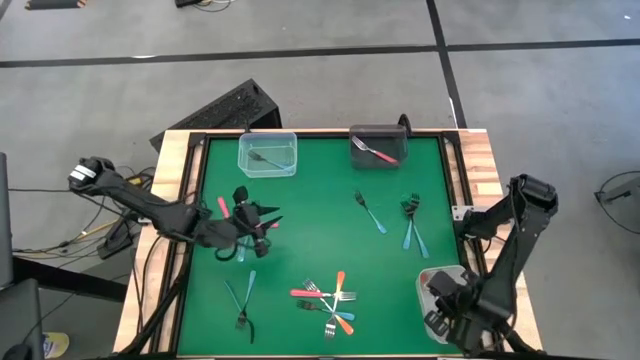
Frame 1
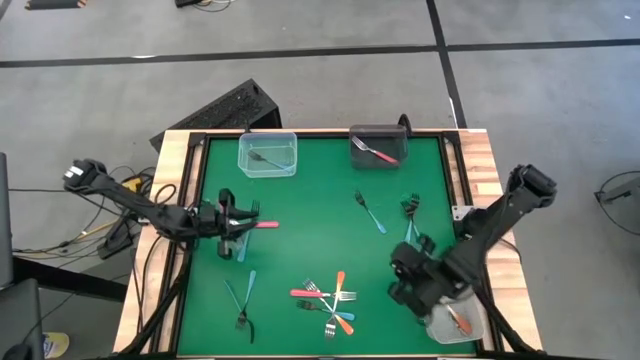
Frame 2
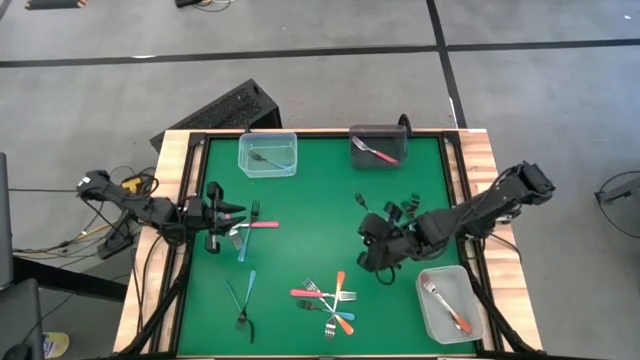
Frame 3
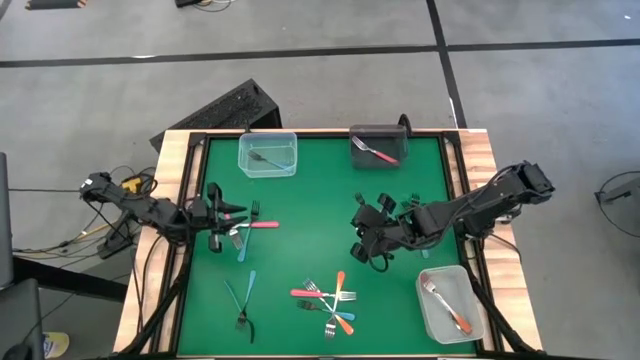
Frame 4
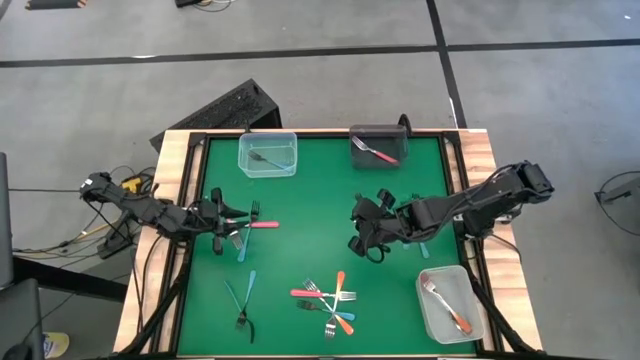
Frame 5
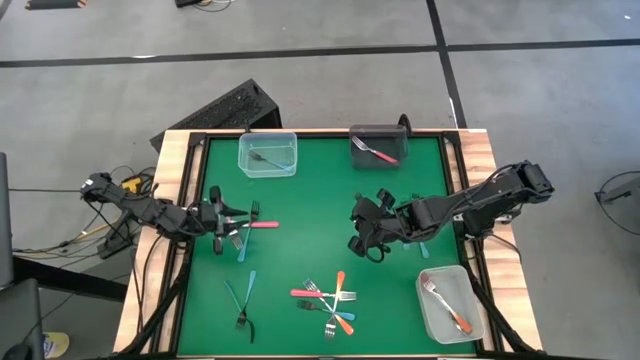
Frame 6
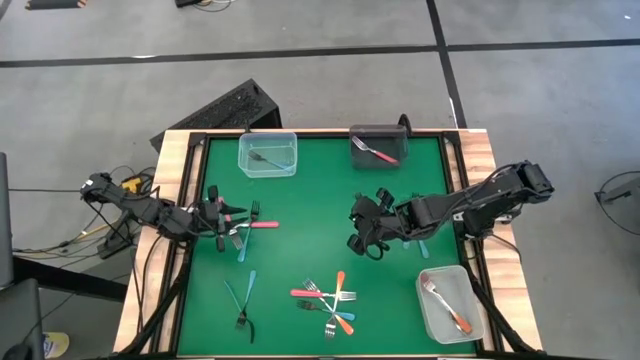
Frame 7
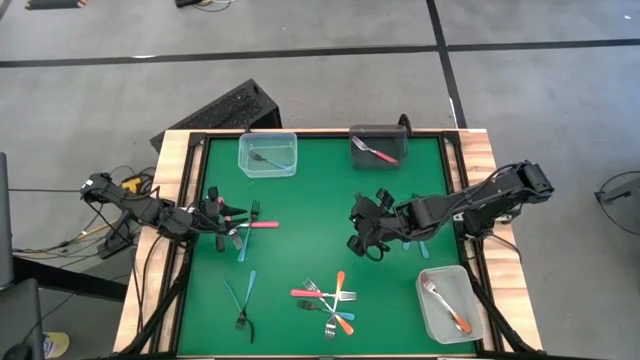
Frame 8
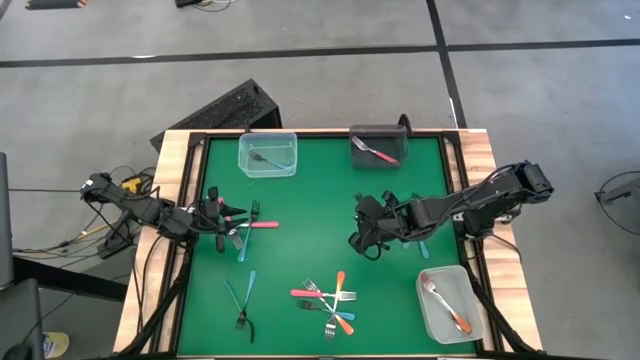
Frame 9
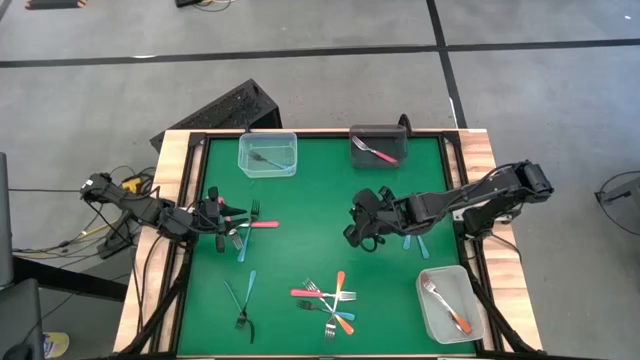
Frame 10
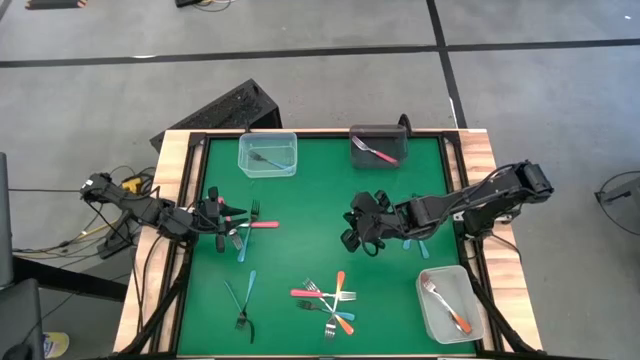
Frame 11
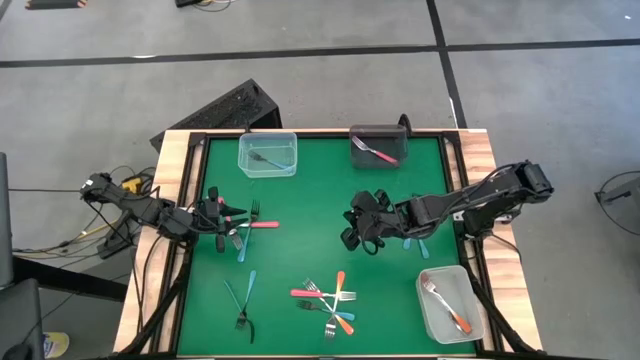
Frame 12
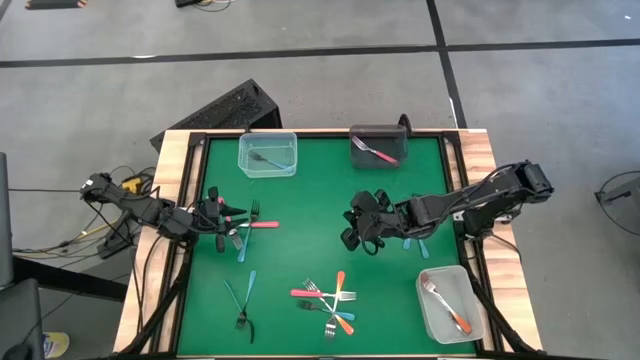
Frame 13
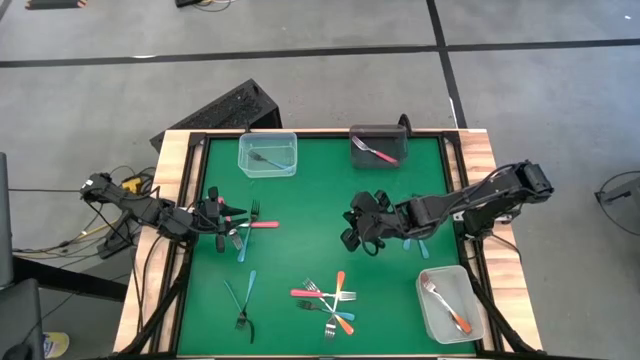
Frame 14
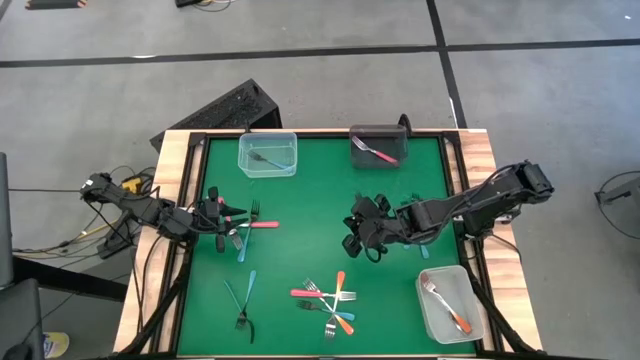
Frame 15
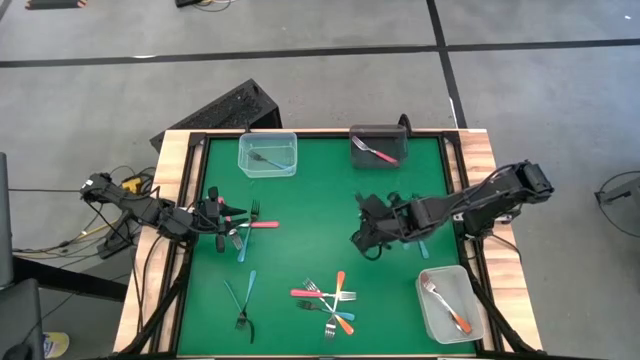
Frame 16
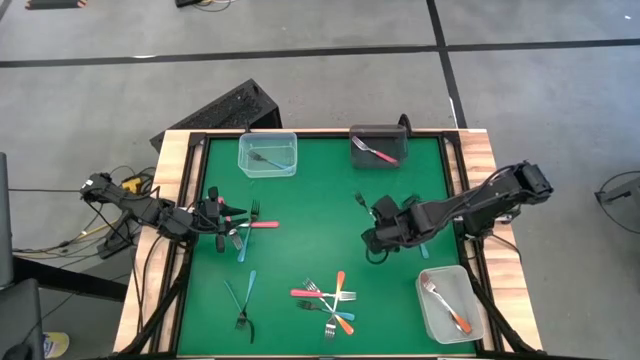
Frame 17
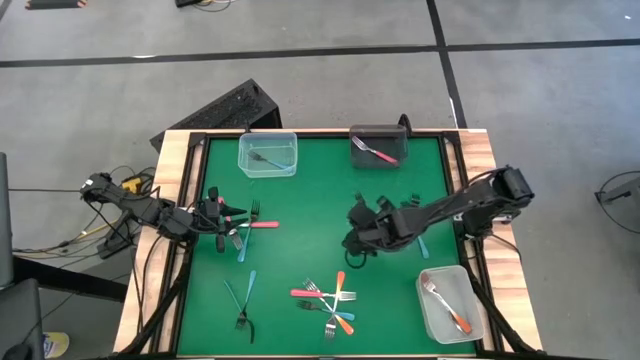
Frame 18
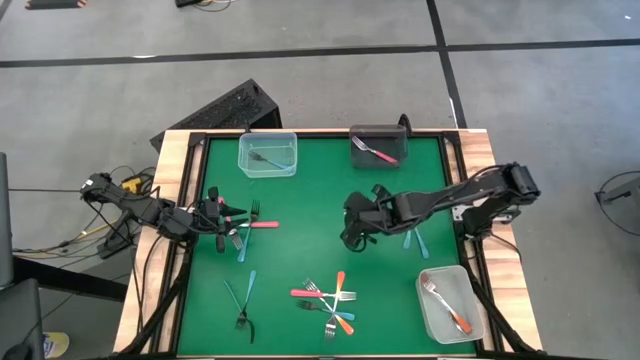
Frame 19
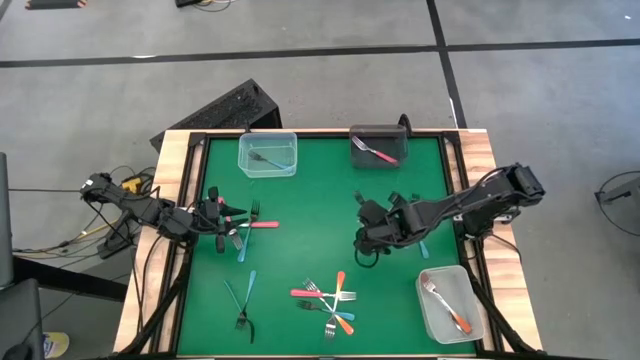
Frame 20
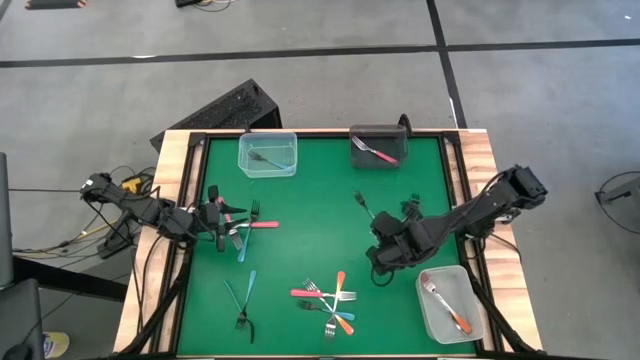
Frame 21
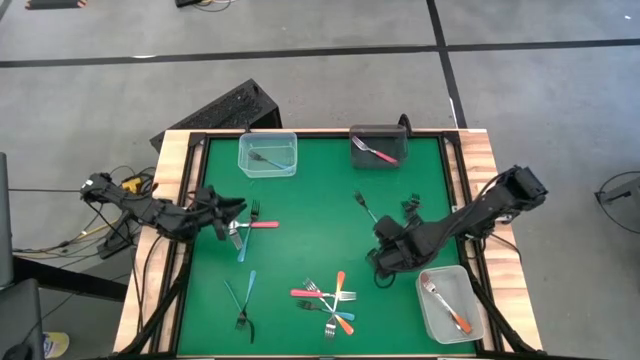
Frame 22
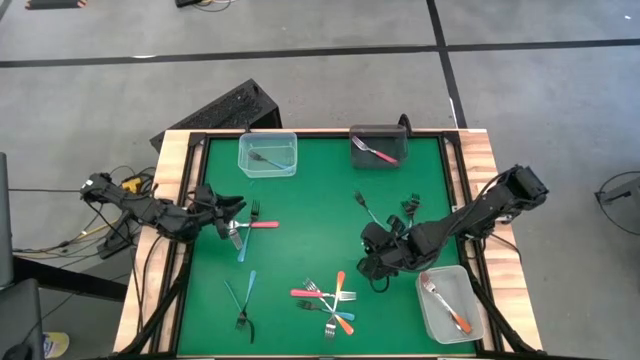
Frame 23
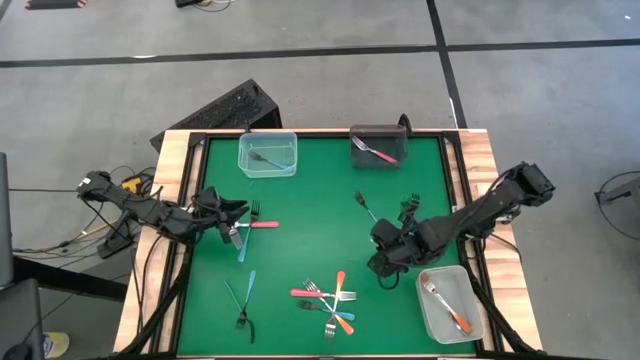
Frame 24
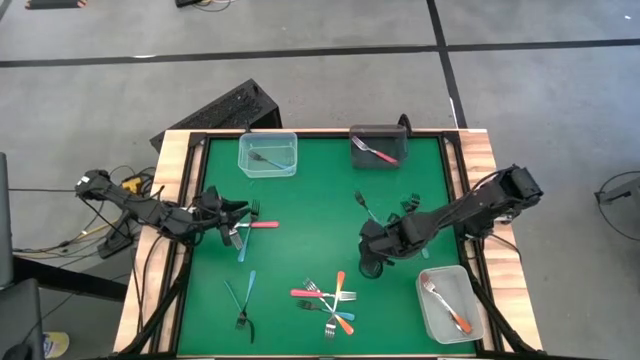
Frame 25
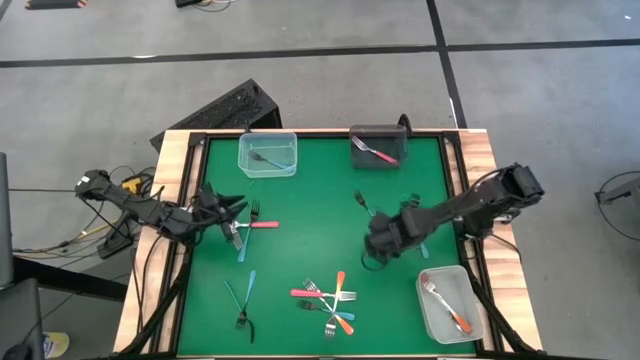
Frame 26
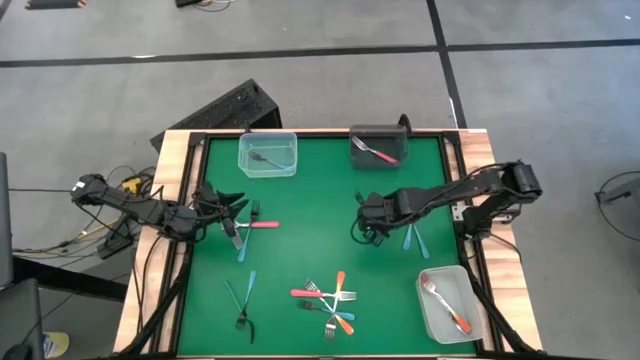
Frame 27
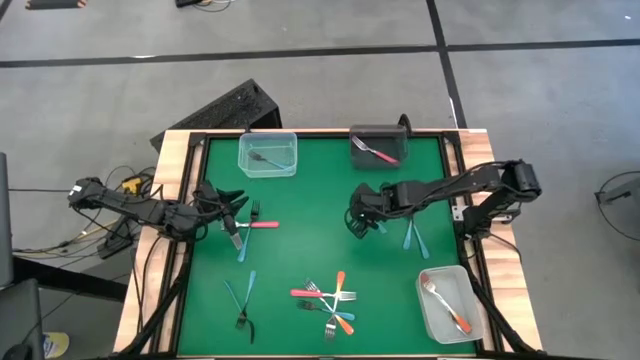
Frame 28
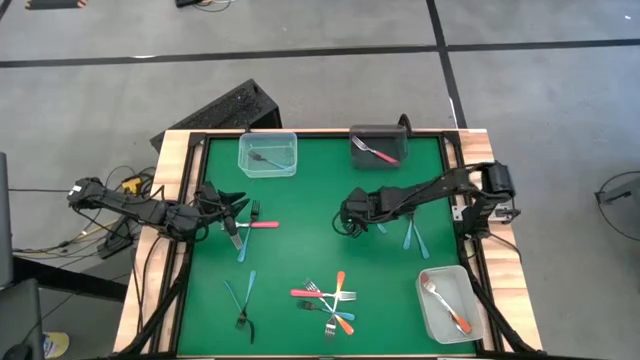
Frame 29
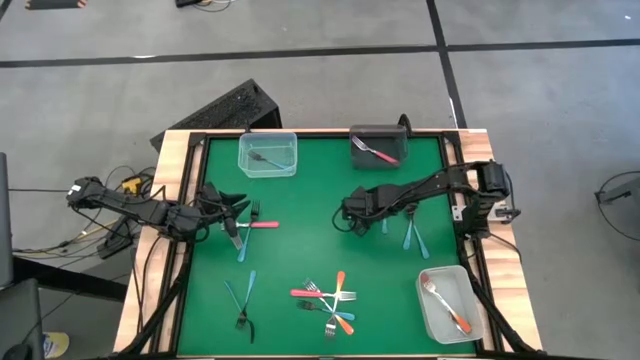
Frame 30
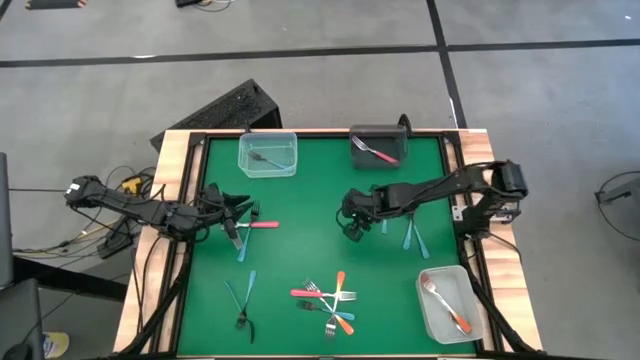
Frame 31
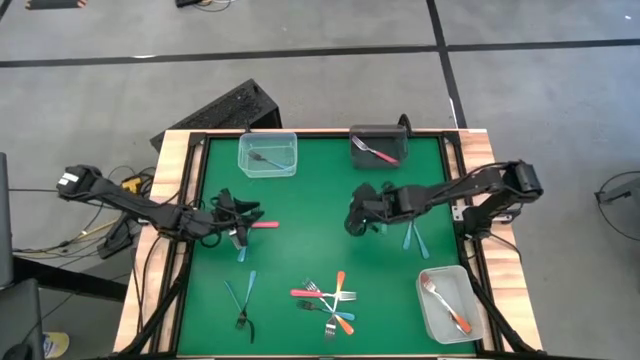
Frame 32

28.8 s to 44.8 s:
Task: Sort silverware by color (type)
Put the black fork into the transparent bin

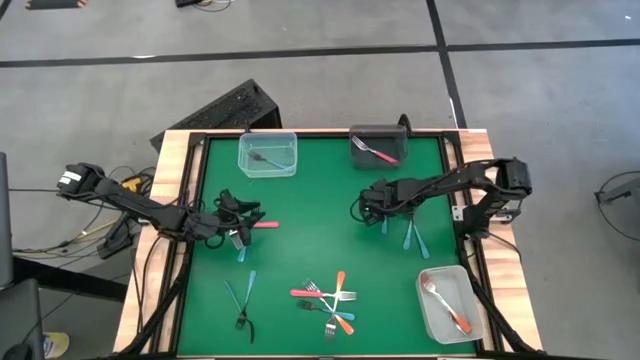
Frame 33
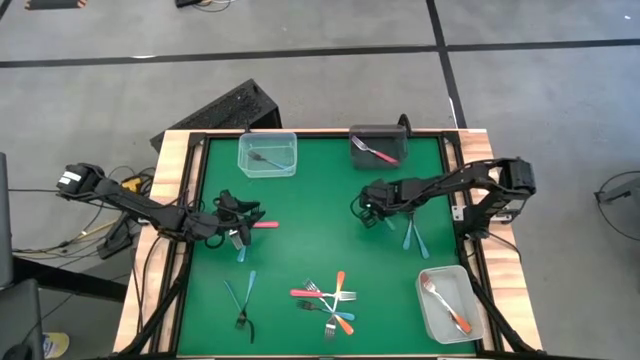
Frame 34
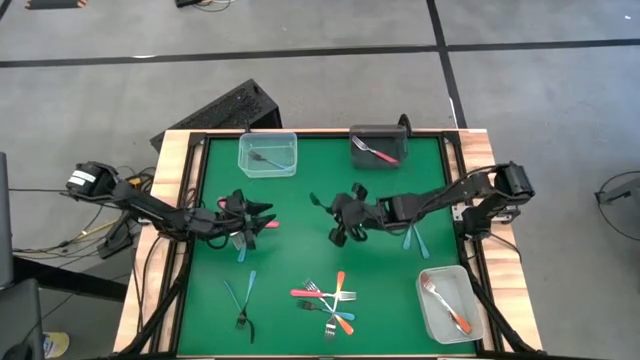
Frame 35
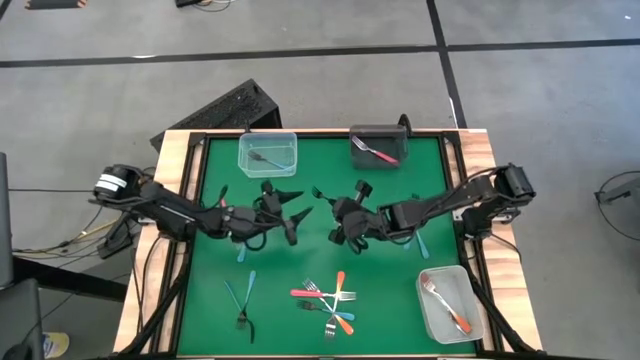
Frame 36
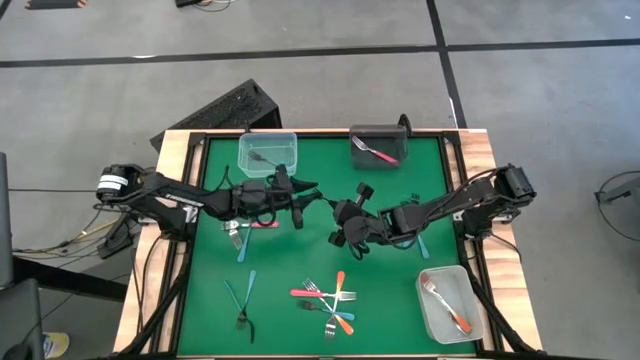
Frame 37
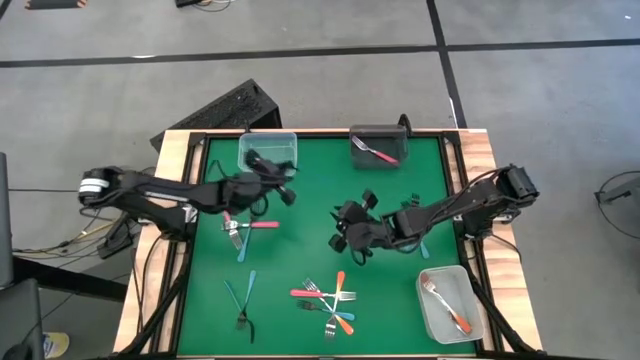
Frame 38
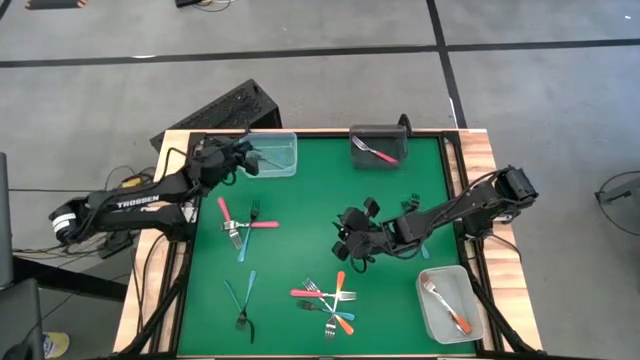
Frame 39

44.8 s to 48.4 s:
Put the black fork into the transparent bin

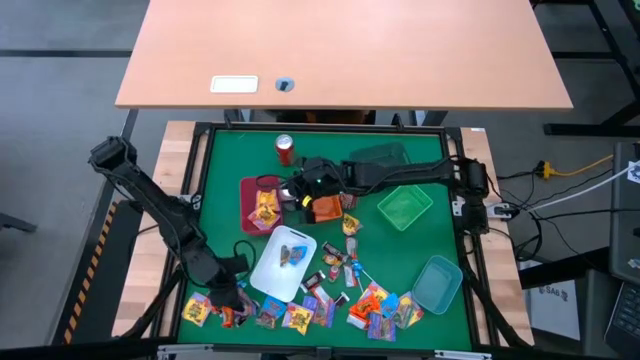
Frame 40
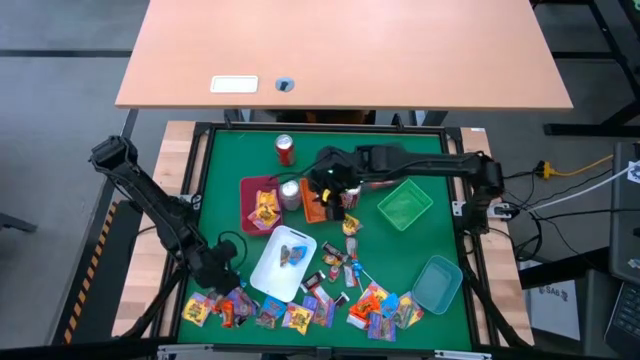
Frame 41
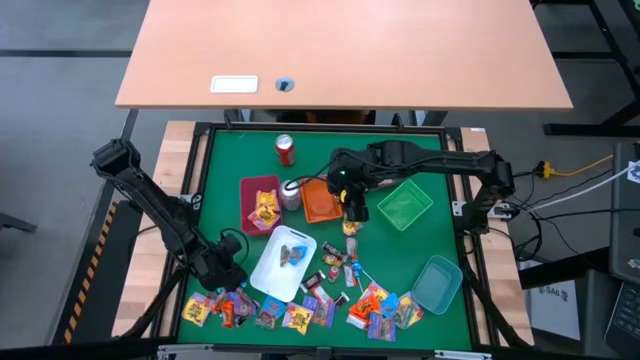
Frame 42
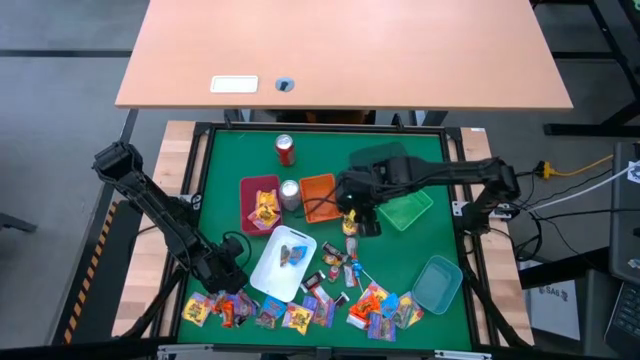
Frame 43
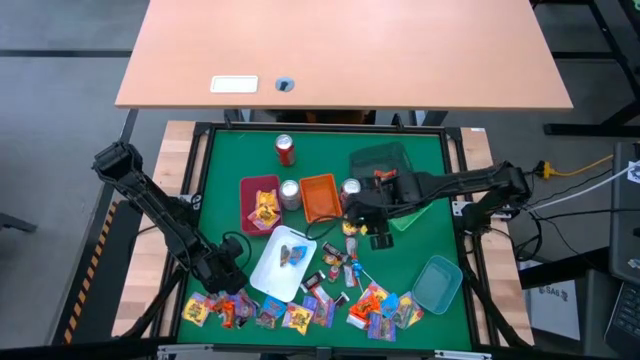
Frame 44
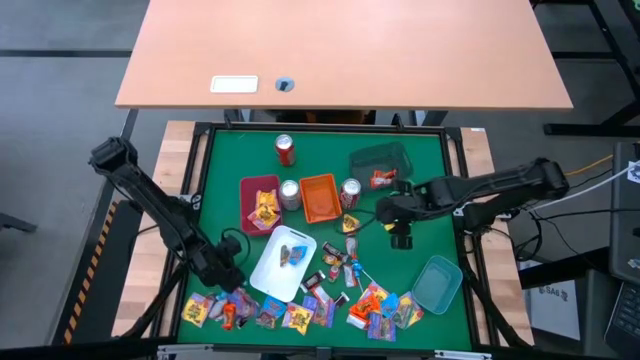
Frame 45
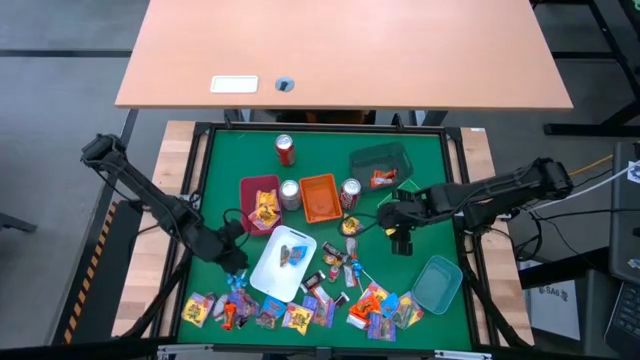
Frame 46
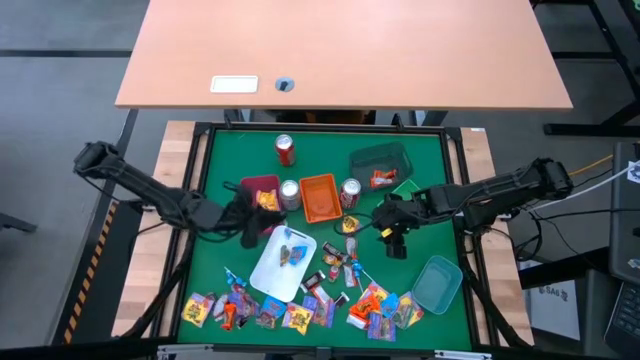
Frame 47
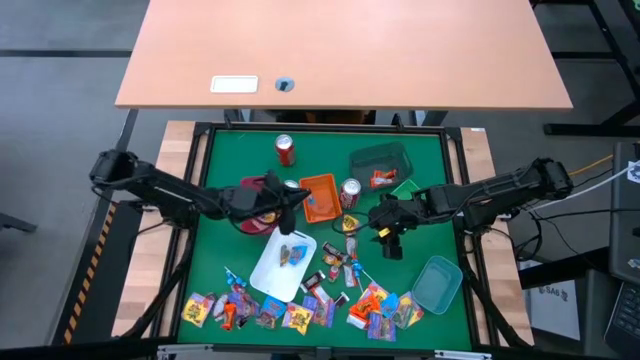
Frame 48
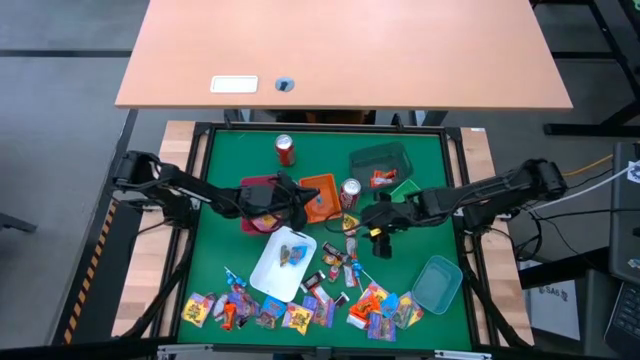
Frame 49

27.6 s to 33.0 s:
Task: Sort candy
Put the blue lollipop into the orange bin
